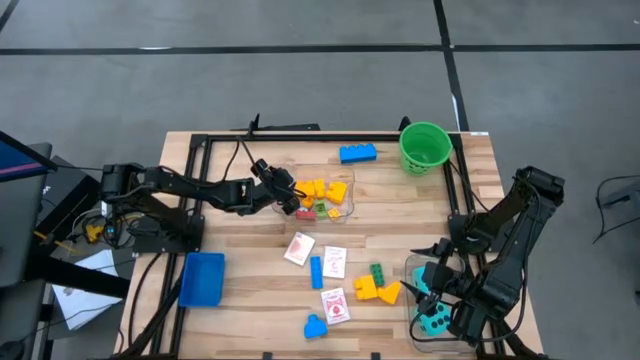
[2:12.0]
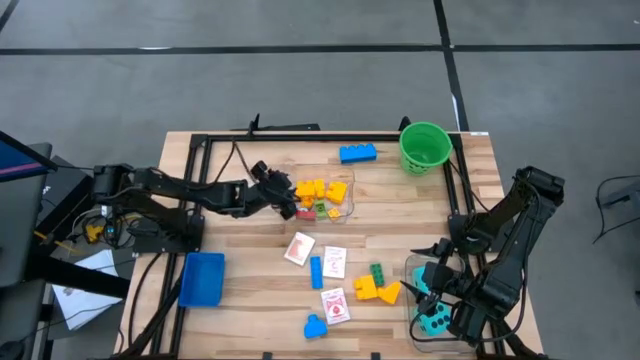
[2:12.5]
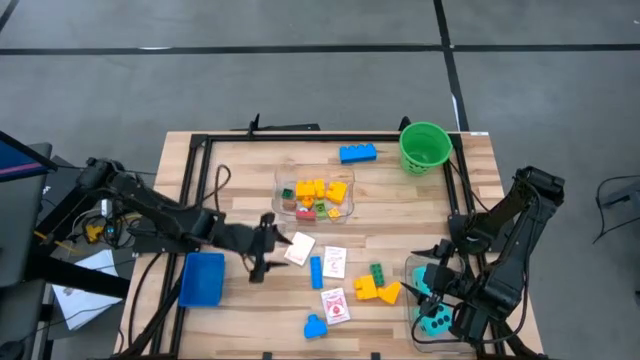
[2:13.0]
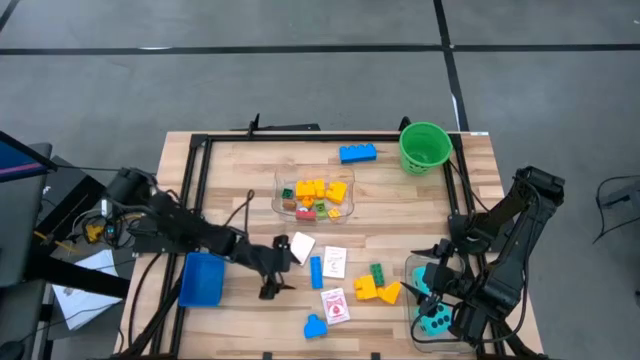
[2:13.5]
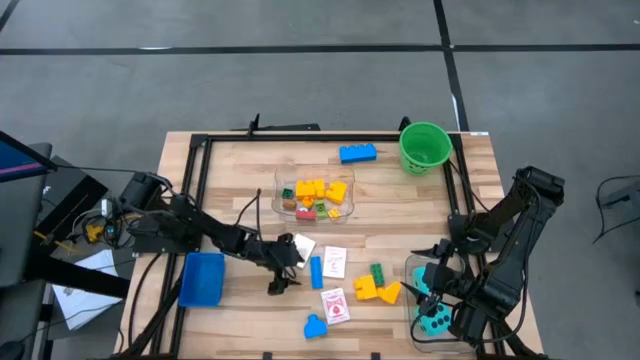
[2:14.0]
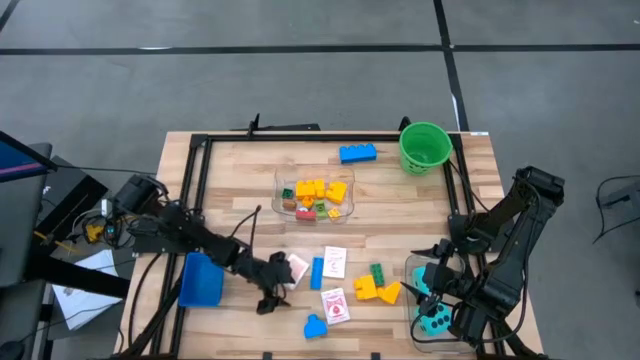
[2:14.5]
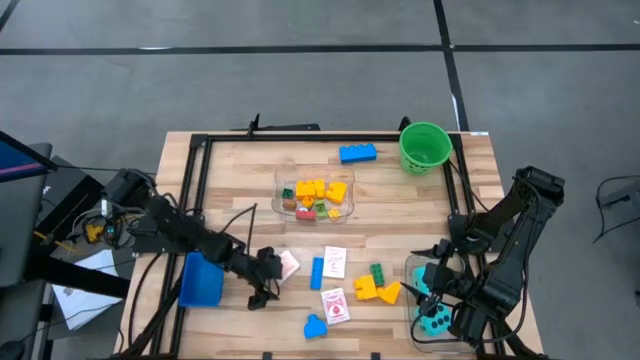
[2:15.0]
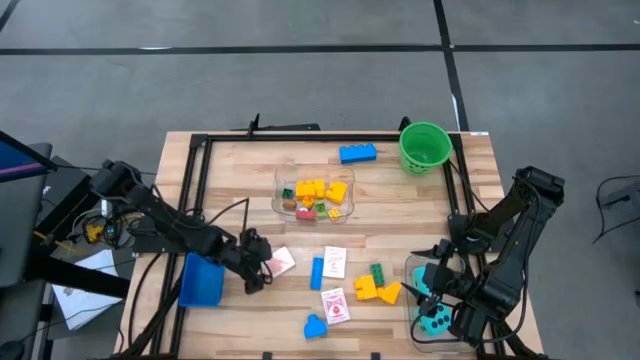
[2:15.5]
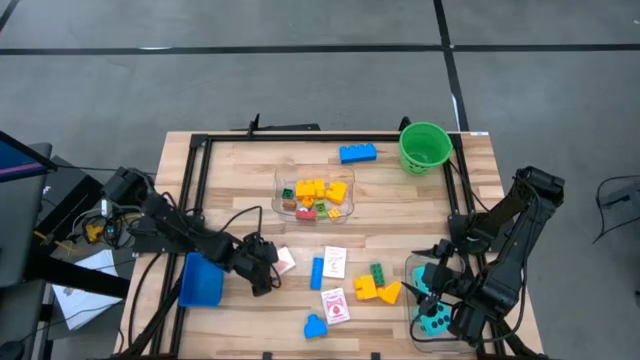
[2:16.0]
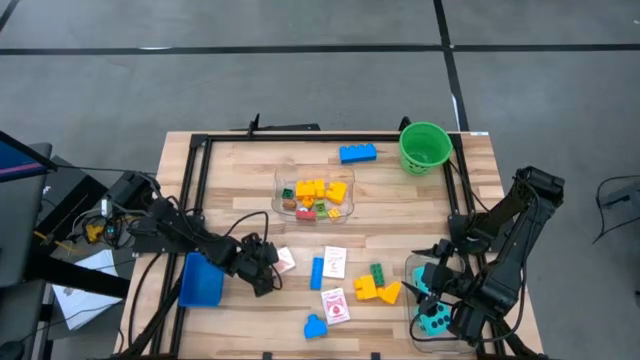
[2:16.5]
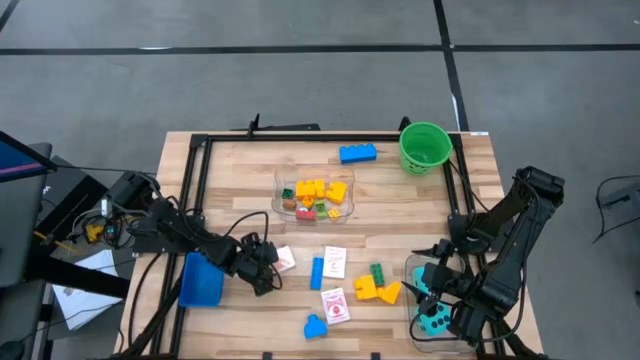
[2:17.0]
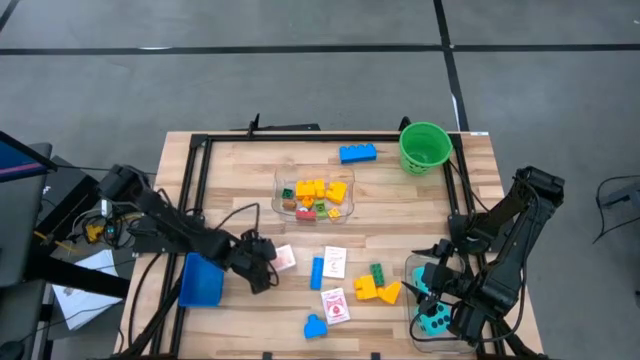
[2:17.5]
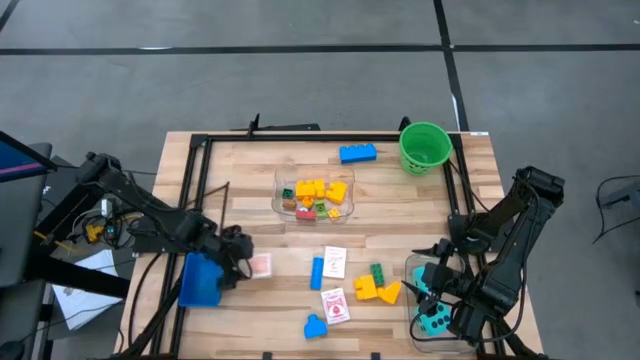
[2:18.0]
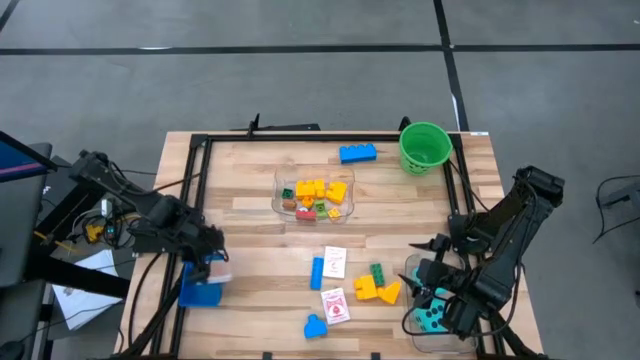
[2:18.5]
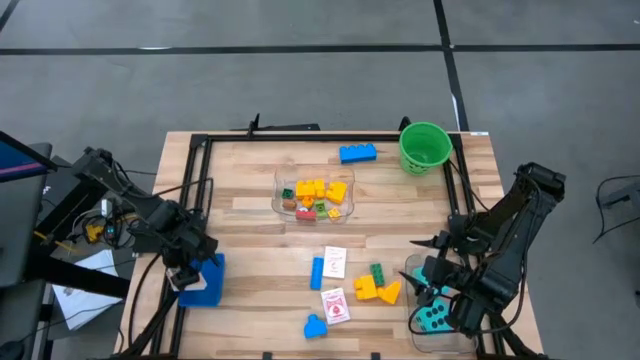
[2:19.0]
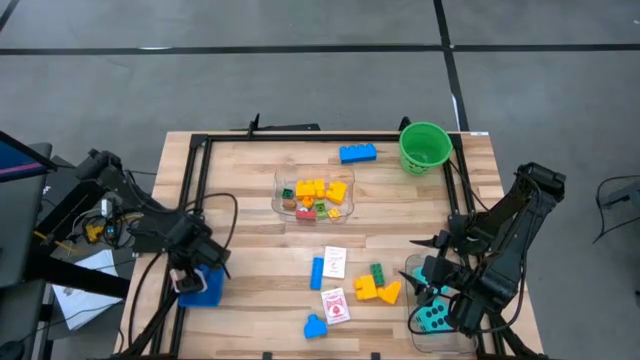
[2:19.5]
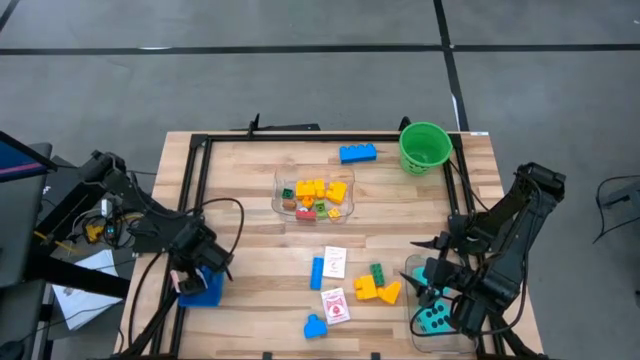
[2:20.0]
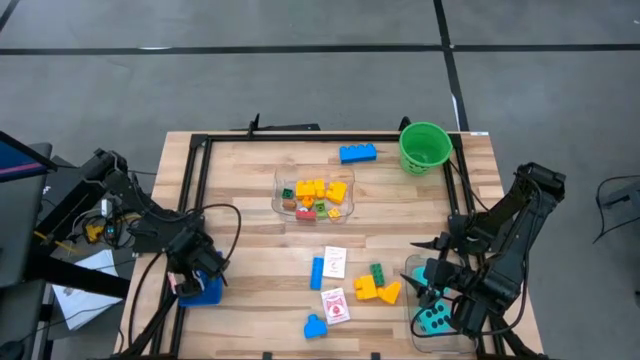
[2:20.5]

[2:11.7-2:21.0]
Task: Pick & Place Toys
Put the orange playing card box into the blue bin

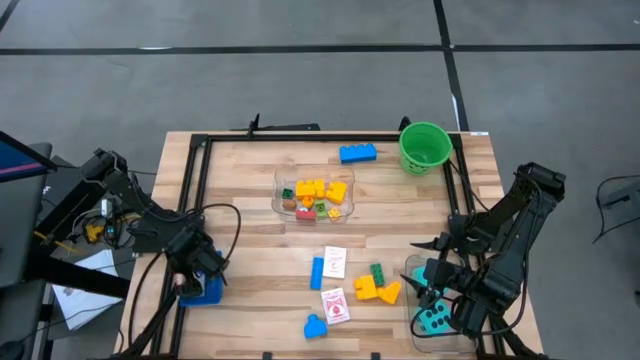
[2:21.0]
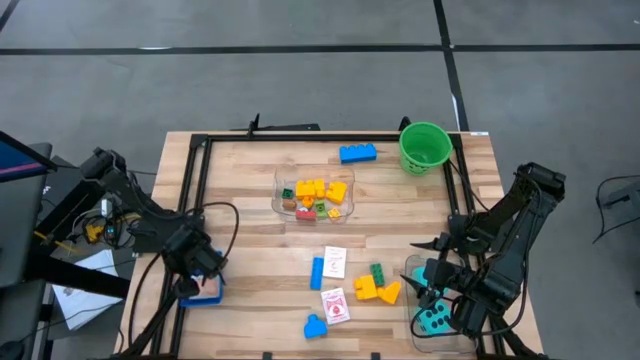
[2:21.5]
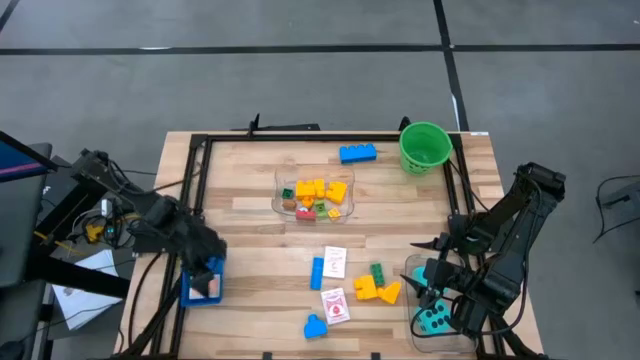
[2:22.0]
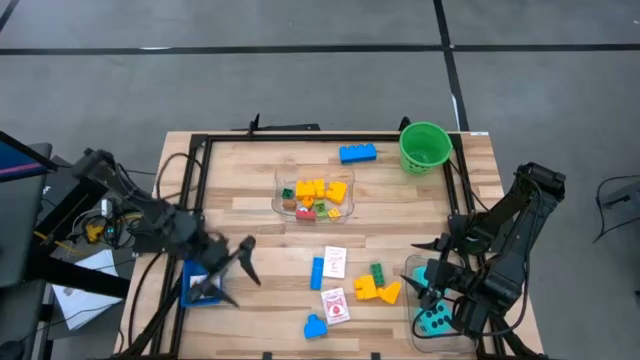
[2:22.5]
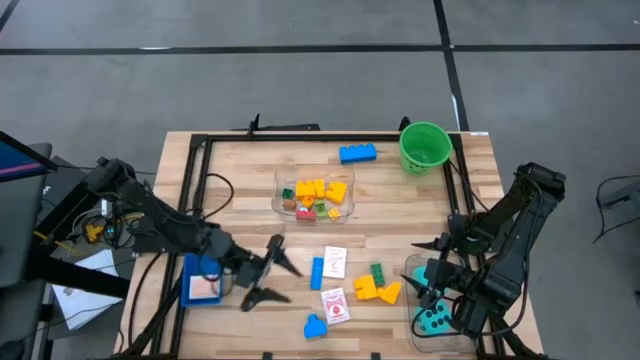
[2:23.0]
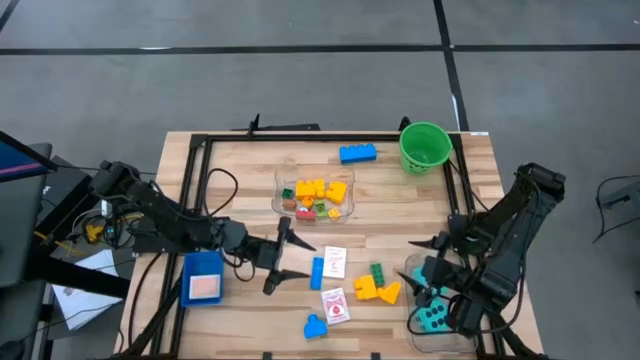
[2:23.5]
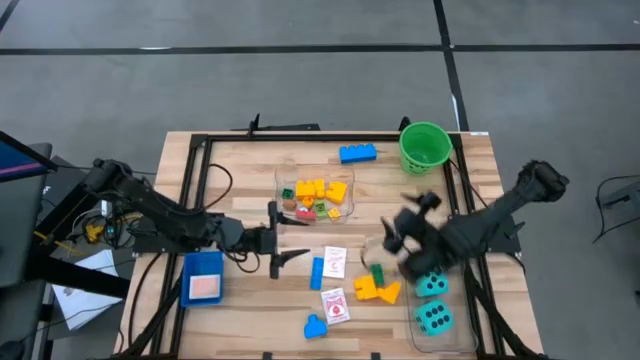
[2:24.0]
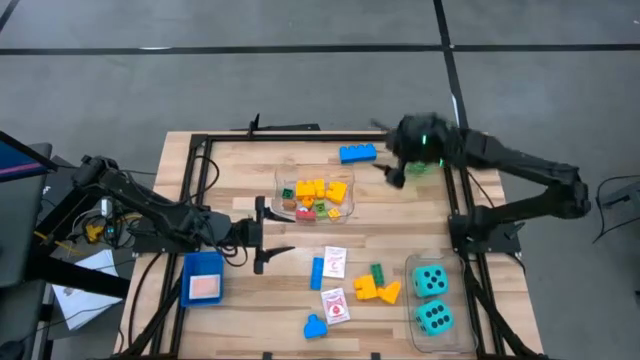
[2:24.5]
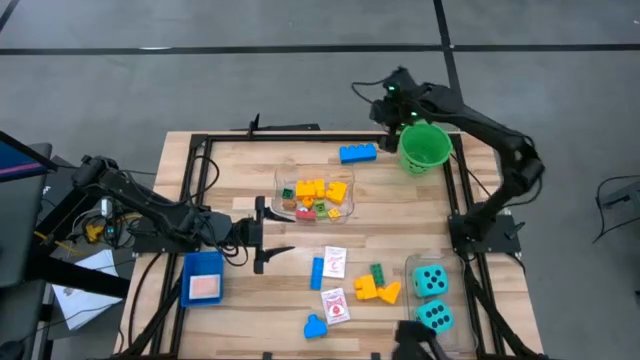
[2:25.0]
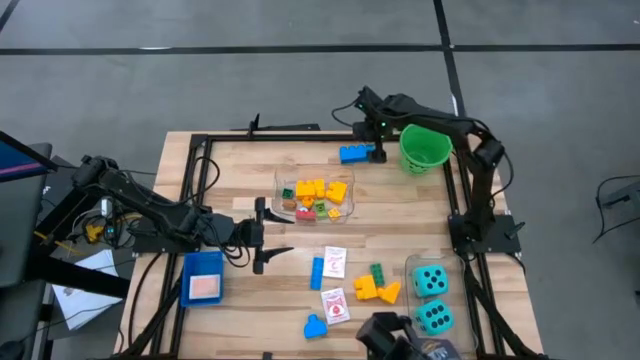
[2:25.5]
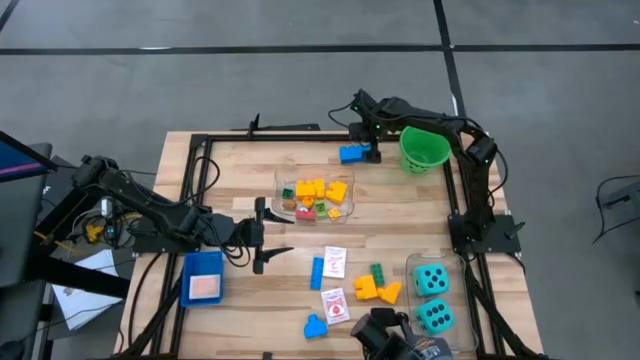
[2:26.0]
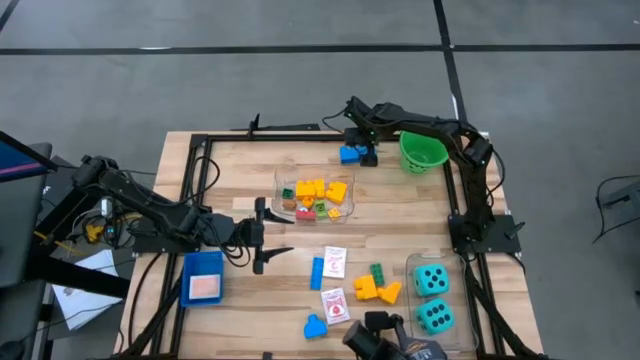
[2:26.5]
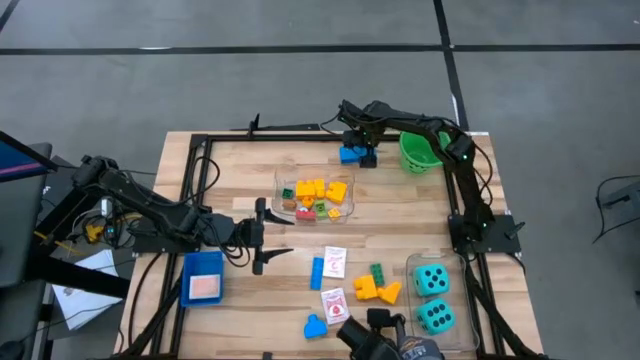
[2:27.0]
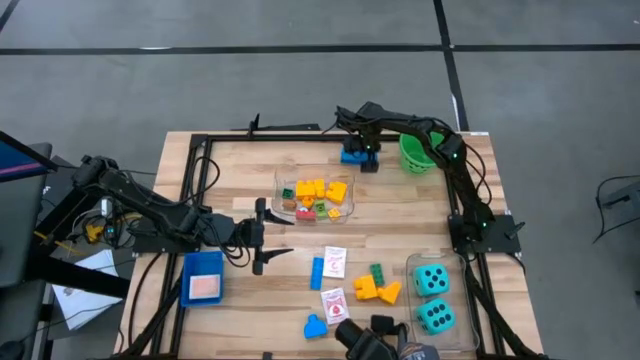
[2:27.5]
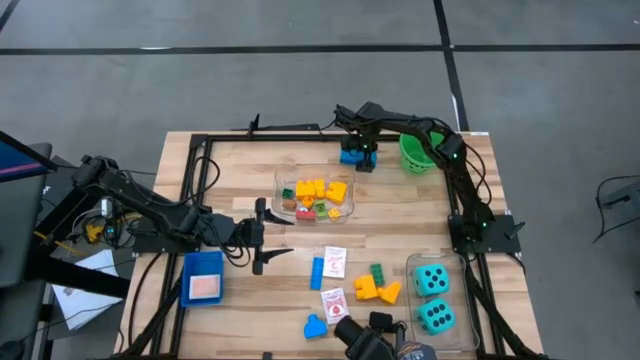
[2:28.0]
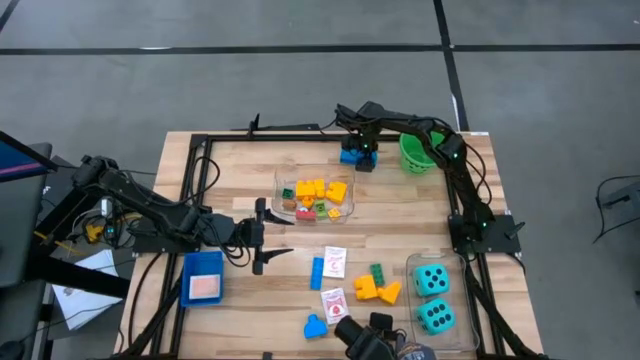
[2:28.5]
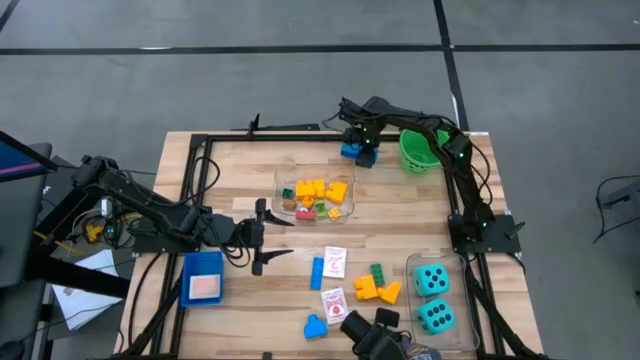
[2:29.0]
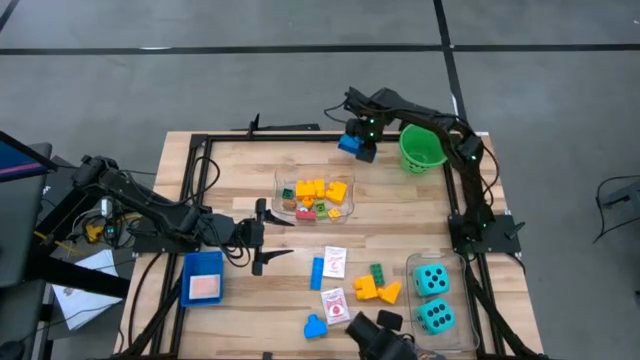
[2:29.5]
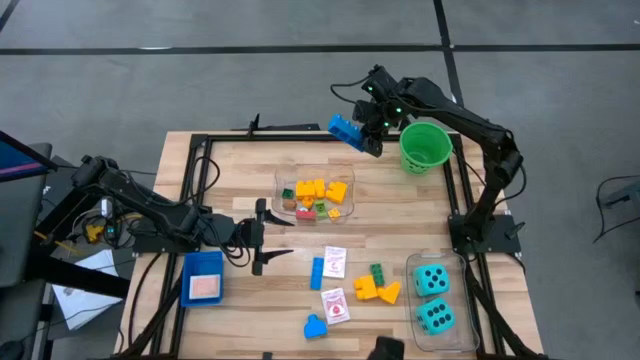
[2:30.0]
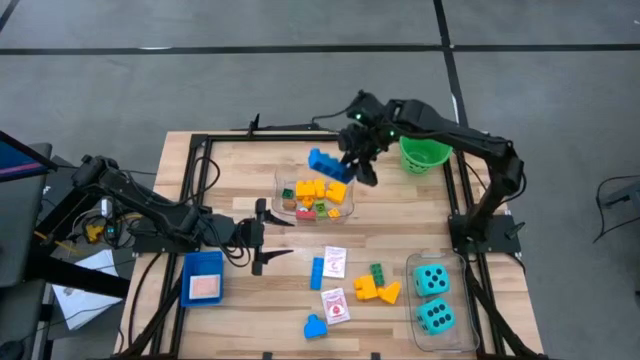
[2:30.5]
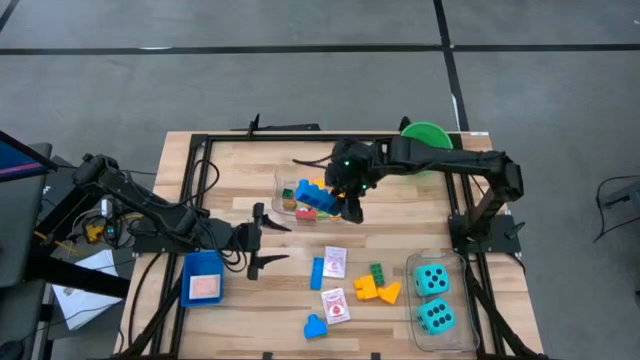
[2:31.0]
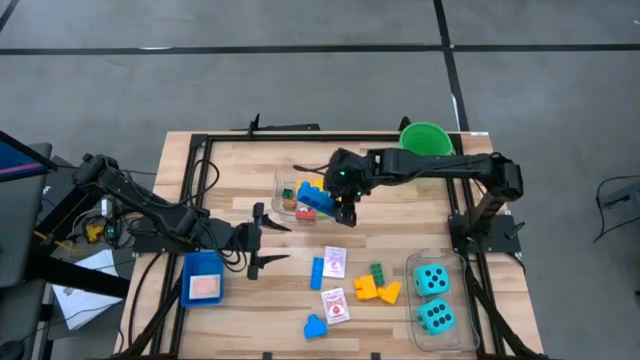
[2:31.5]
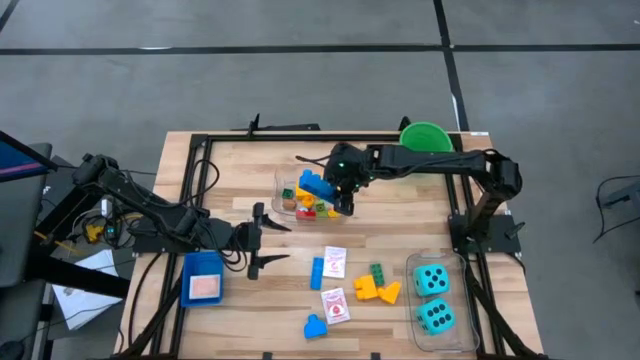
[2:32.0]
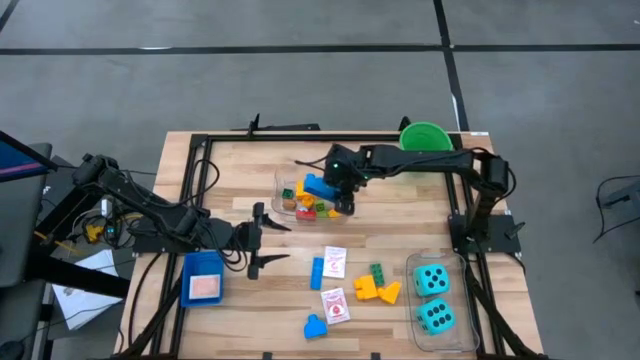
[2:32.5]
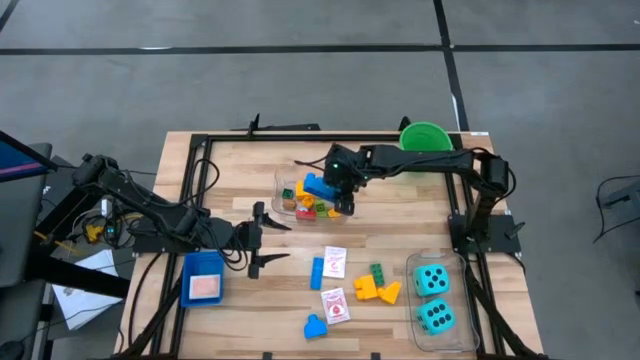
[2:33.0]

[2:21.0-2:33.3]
Put the blue game piece into the top transparent bin
